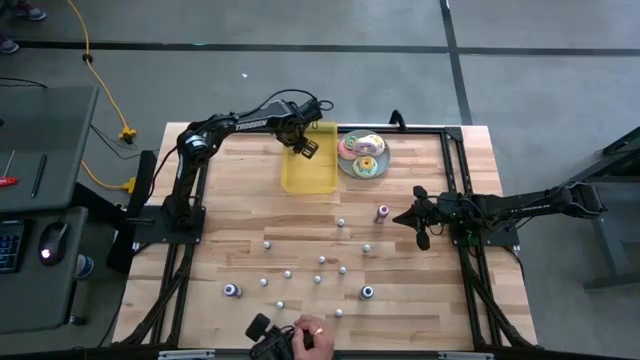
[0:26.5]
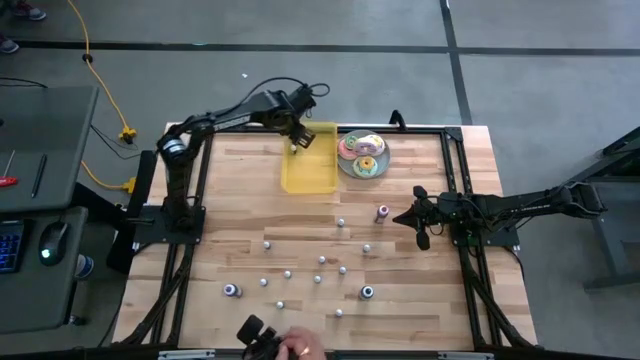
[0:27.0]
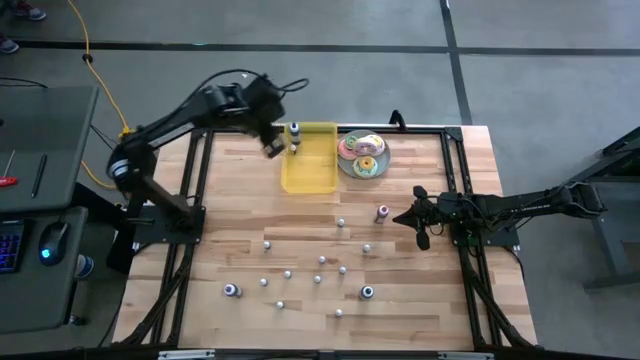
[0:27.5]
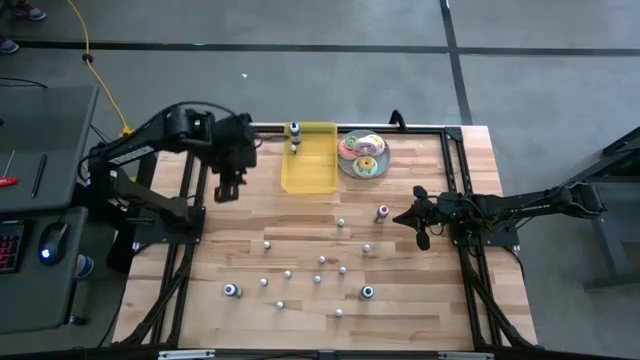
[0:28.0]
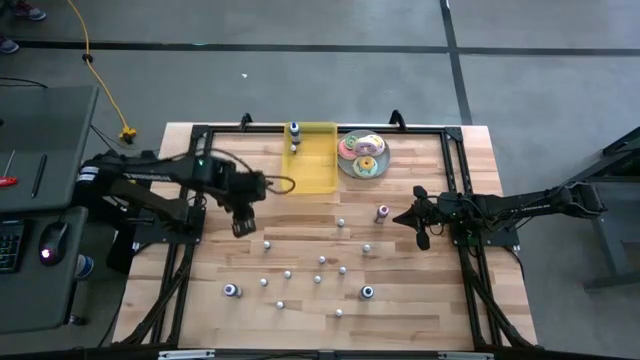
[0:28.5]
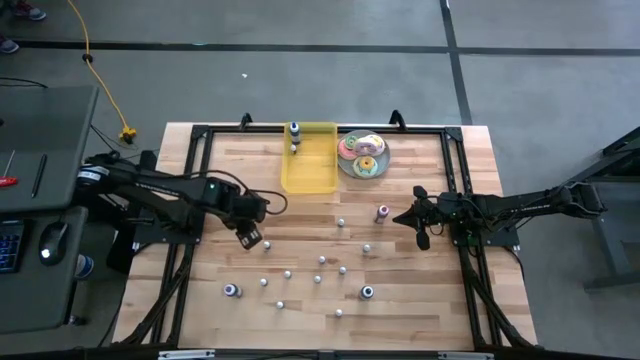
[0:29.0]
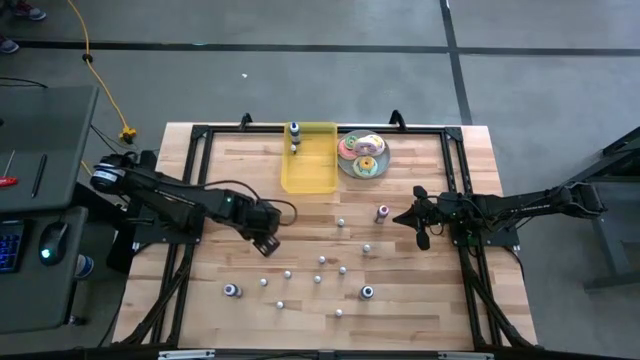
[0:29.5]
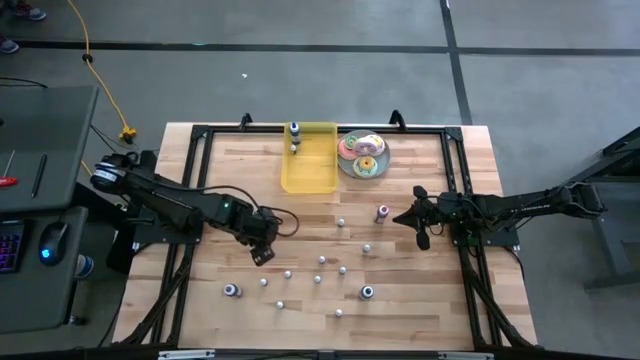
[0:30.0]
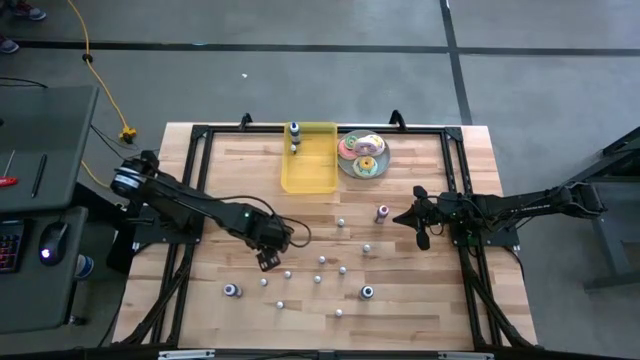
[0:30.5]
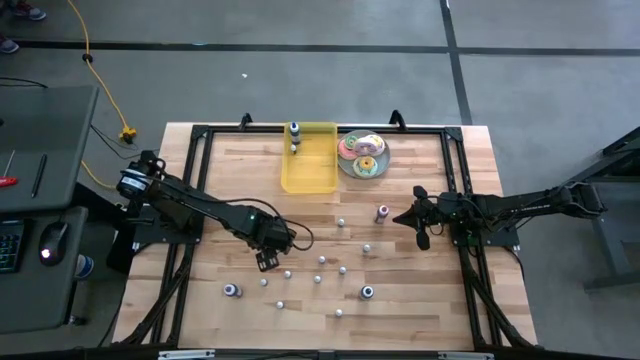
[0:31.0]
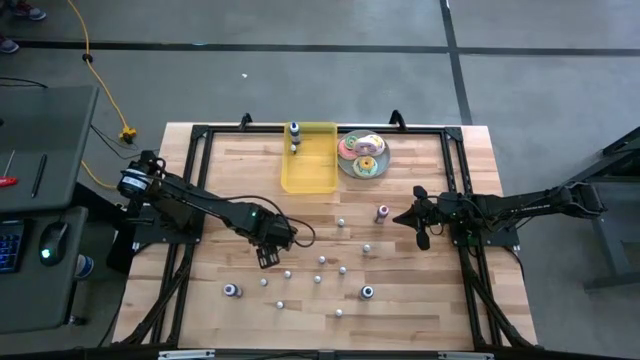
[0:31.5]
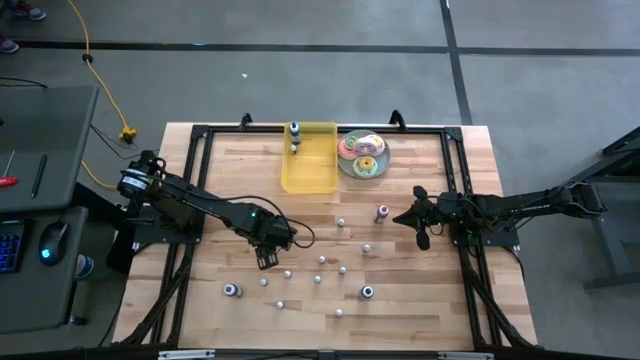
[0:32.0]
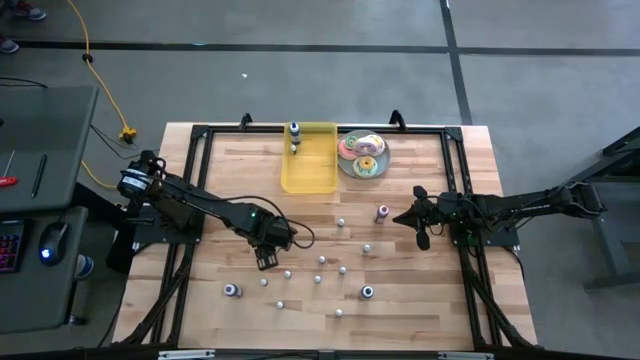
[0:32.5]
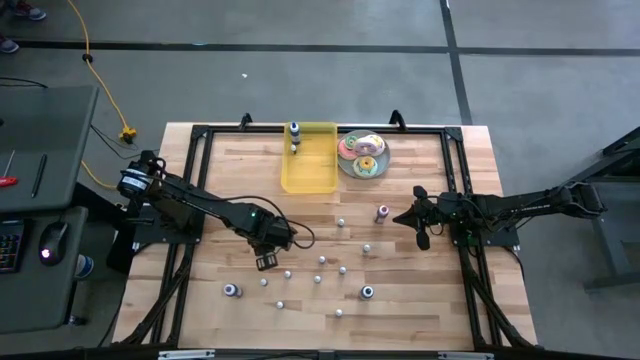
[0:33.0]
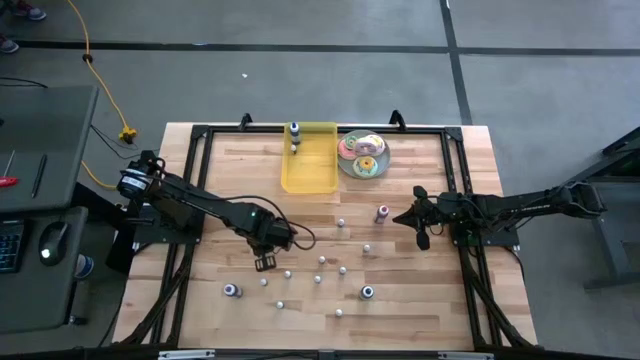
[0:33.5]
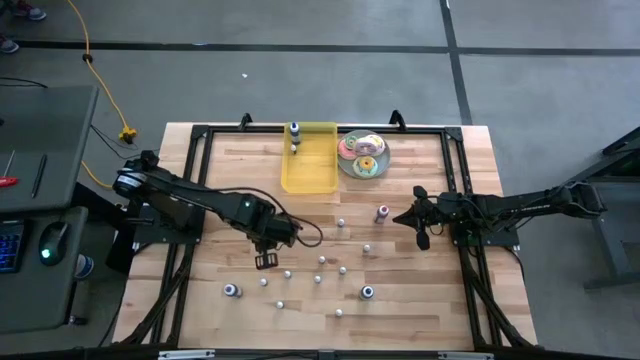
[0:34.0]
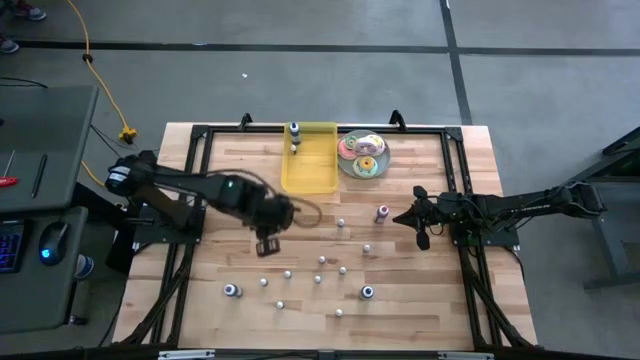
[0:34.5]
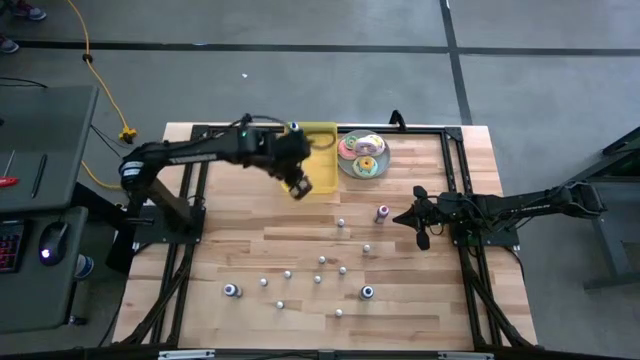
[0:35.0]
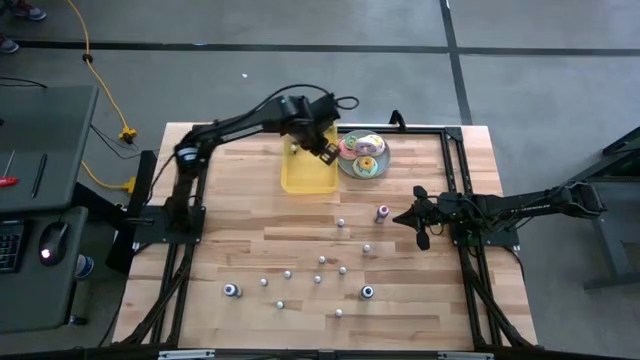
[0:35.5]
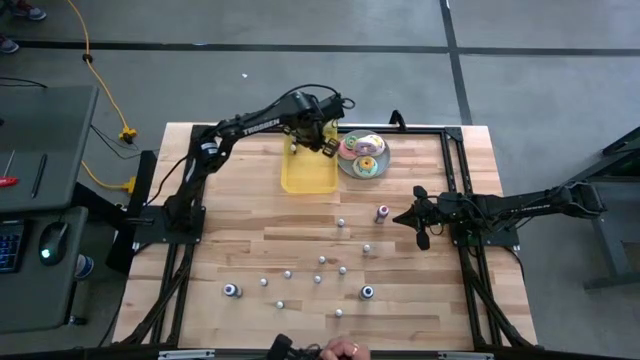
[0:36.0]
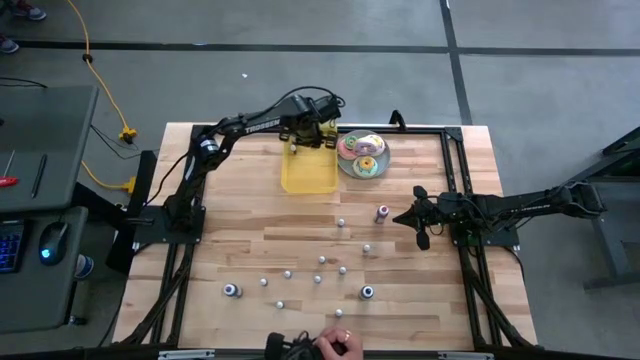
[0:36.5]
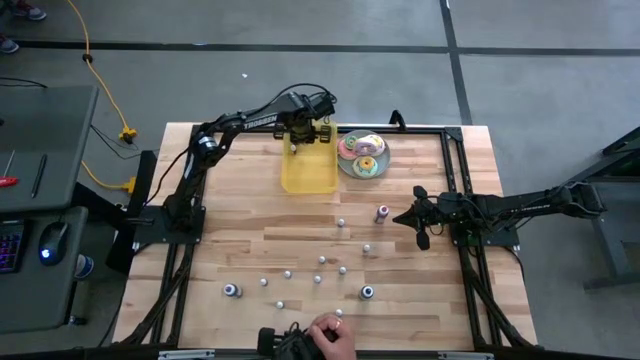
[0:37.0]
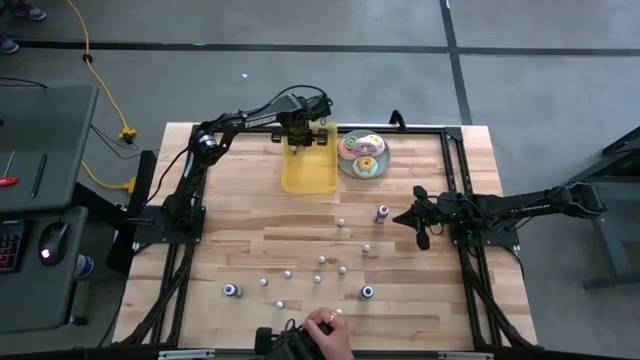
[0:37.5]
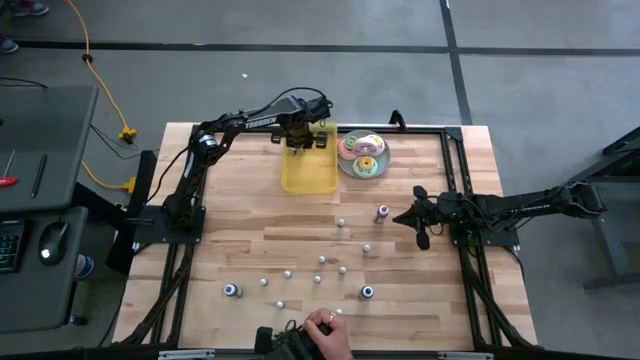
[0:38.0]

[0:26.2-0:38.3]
Task: Pick & Place food coloring
Put the small black food coloring bottle into the bin

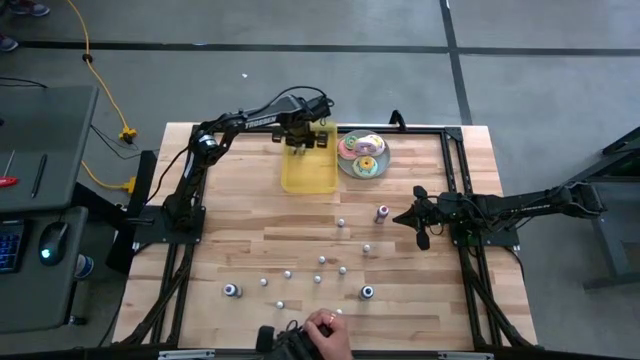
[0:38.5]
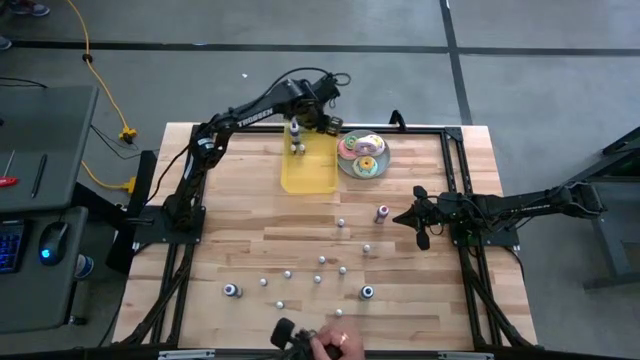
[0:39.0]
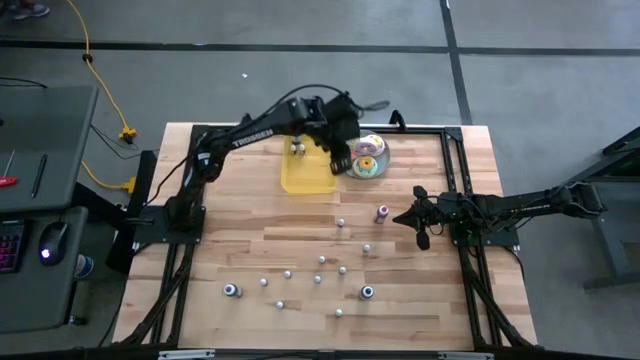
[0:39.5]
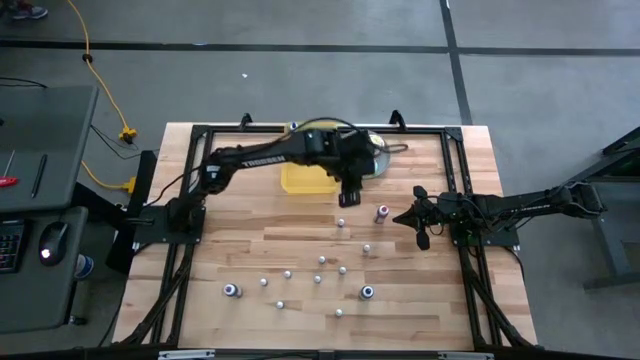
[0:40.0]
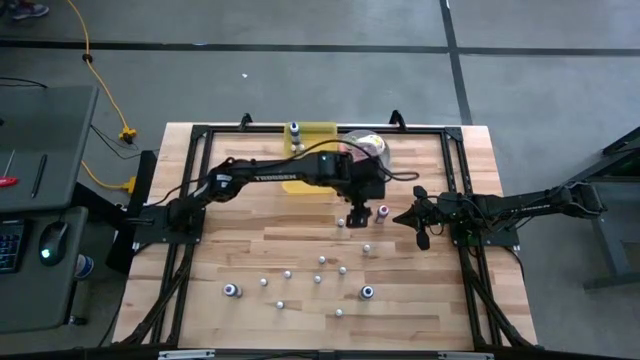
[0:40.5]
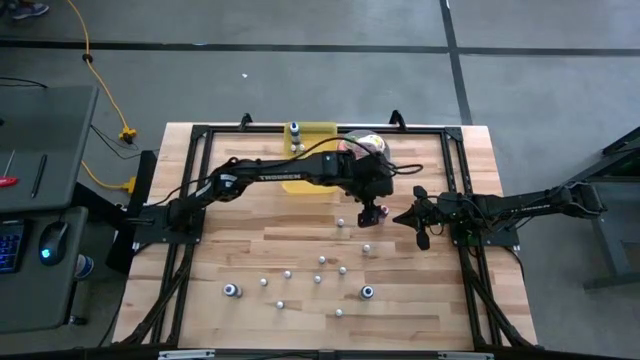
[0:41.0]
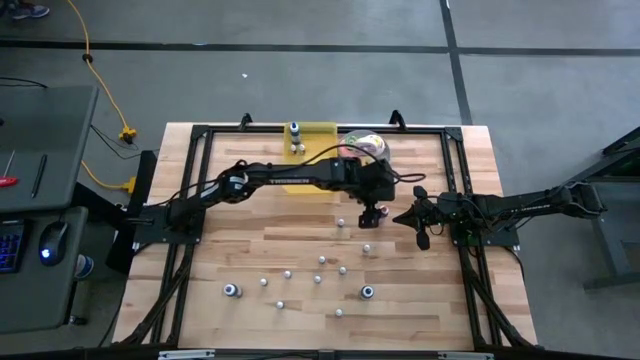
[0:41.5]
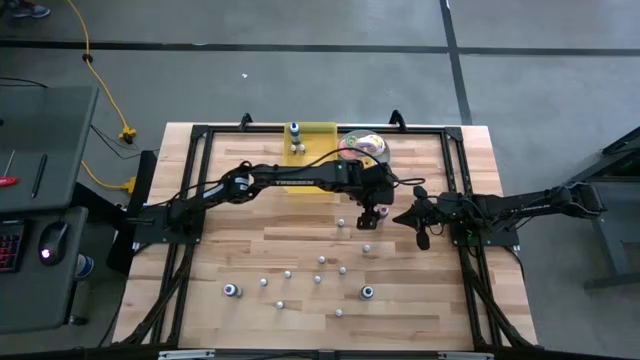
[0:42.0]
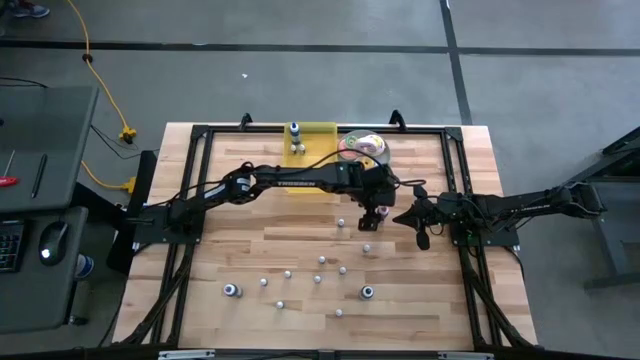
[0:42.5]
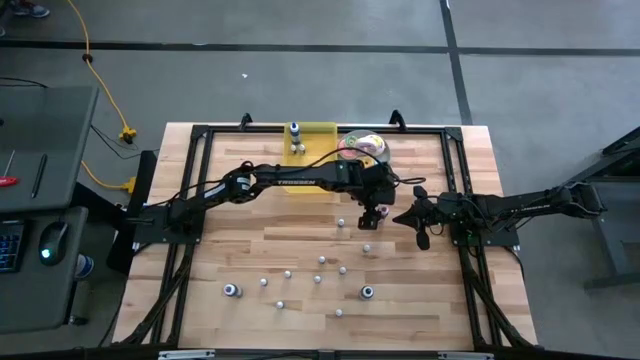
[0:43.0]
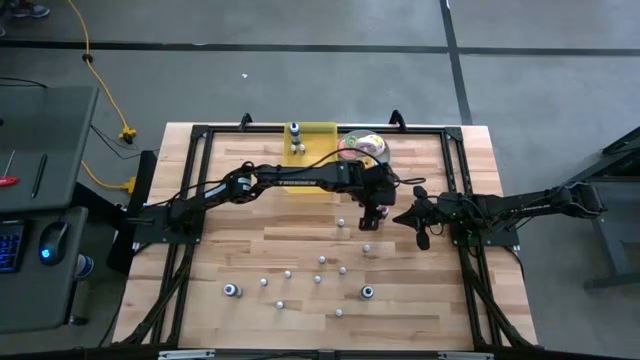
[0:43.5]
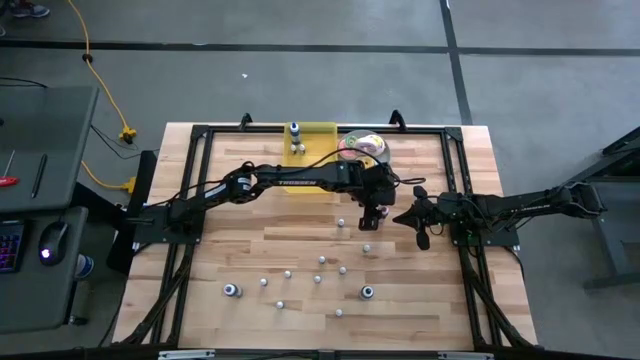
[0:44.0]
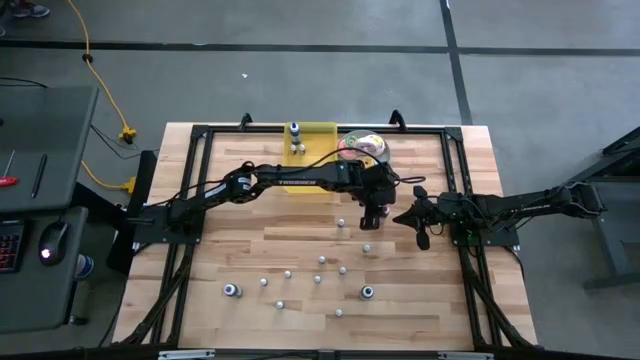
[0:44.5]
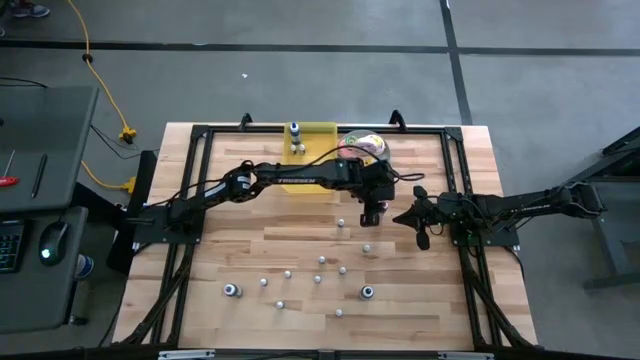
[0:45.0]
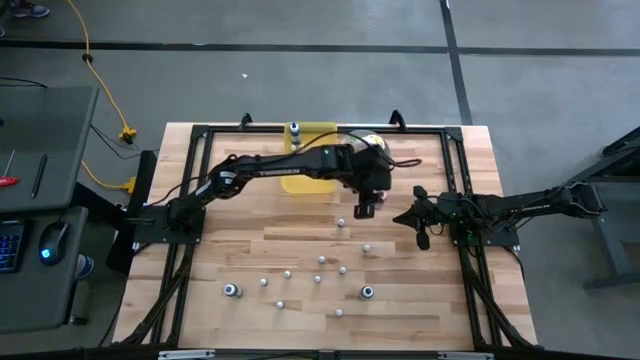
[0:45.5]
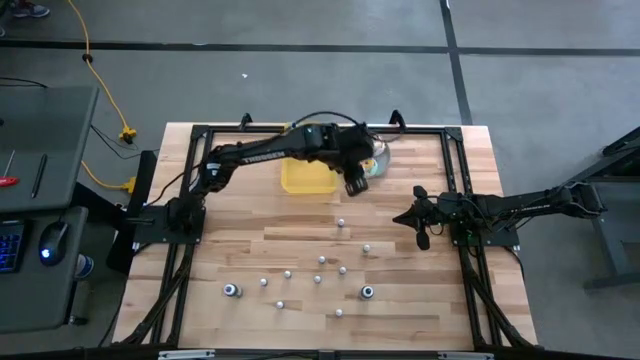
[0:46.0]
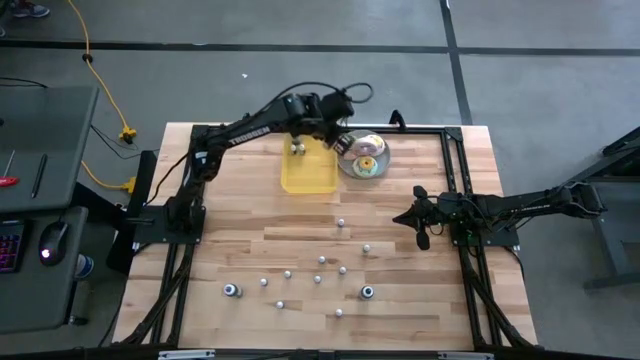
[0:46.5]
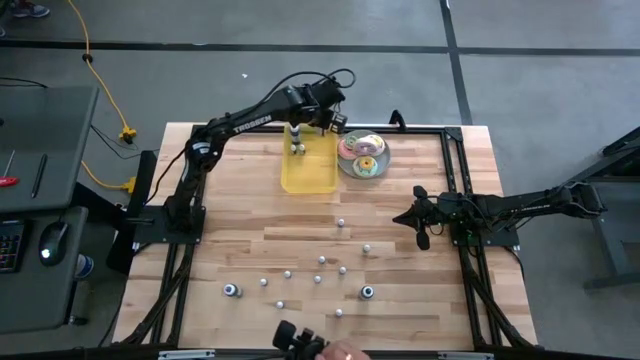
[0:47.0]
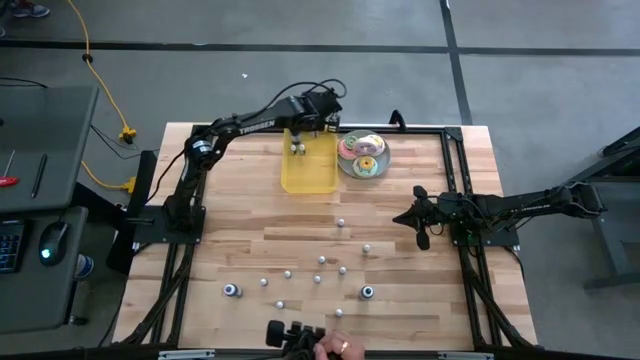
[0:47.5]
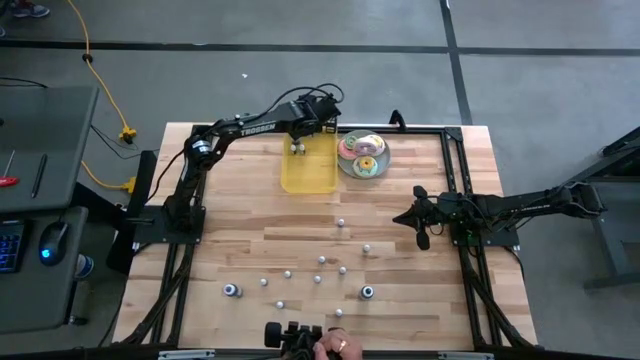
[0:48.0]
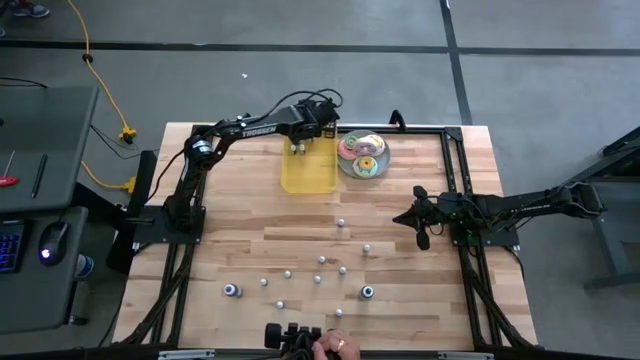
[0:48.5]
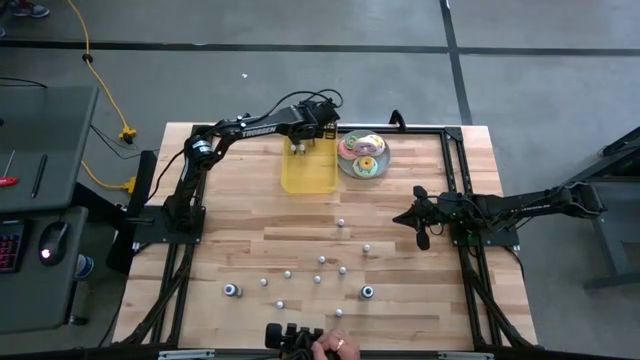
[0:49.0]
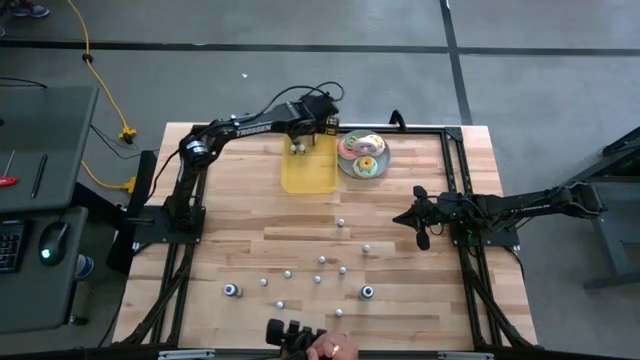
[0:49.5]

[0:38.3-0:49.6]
Put the big pink food coloring bottle into the bin
